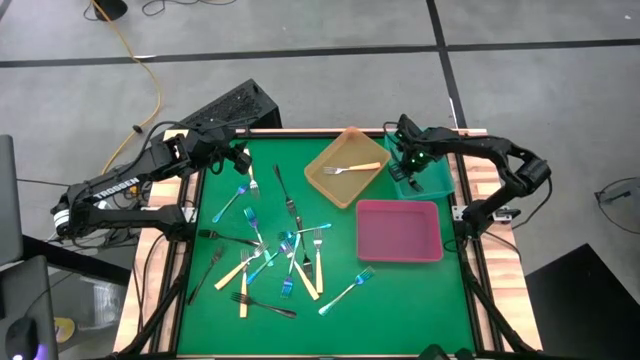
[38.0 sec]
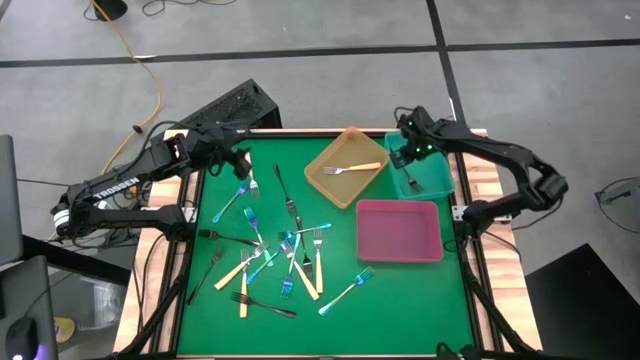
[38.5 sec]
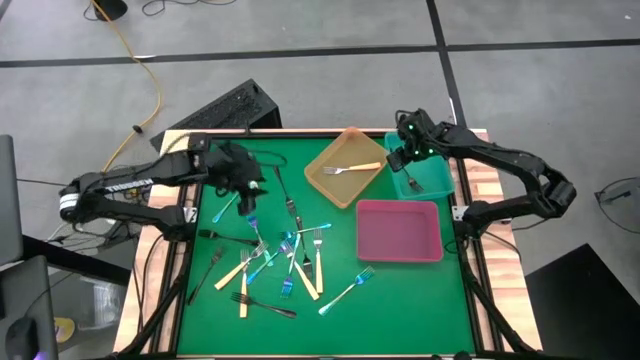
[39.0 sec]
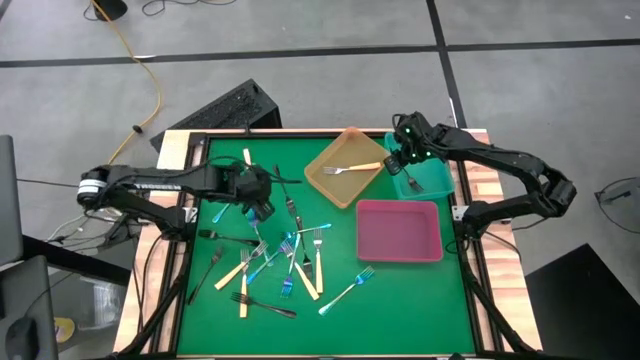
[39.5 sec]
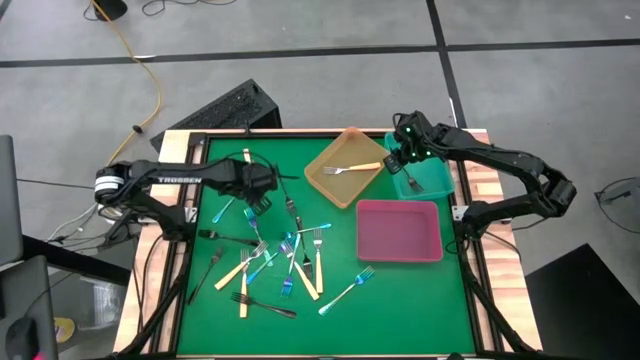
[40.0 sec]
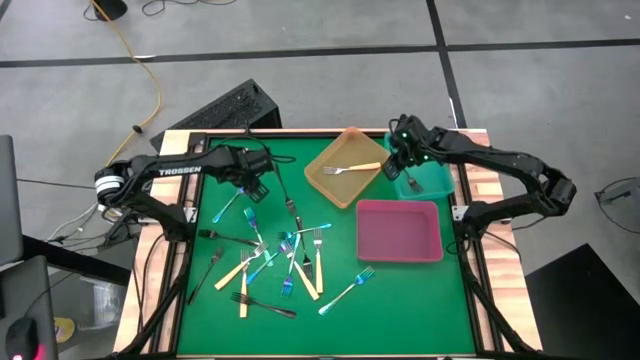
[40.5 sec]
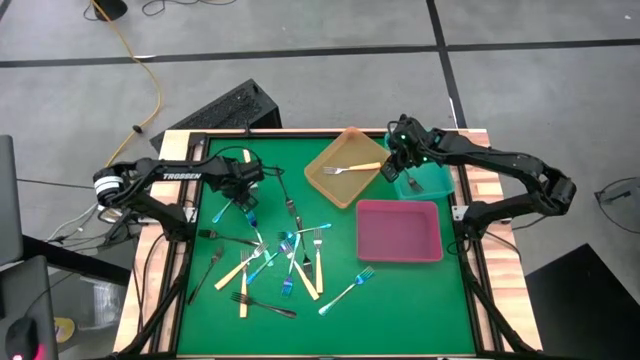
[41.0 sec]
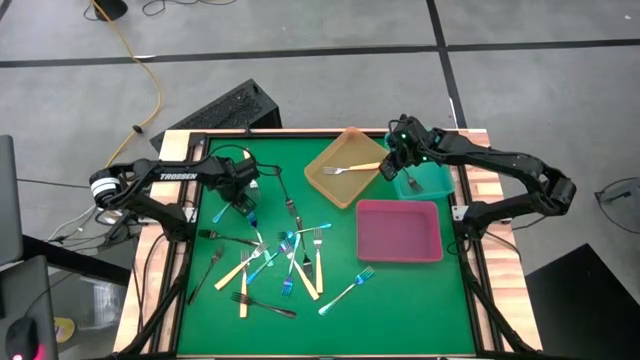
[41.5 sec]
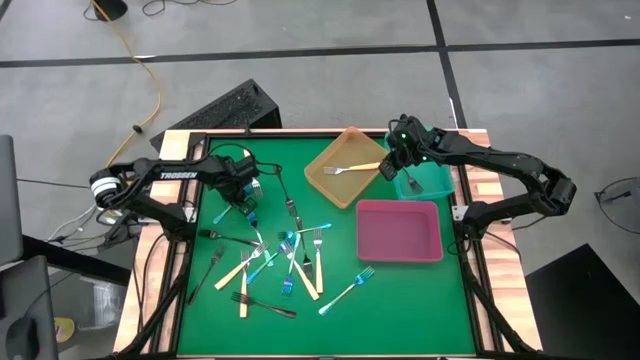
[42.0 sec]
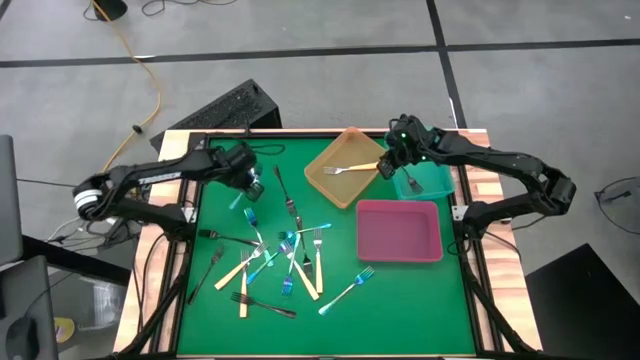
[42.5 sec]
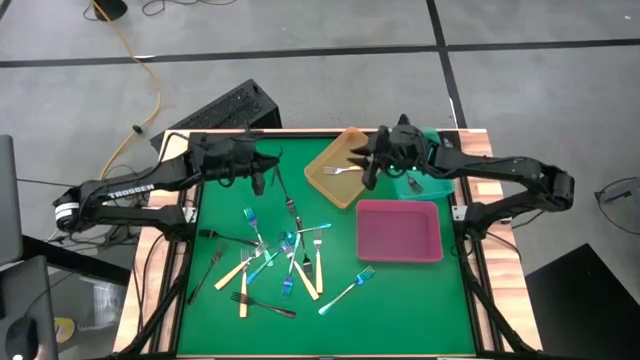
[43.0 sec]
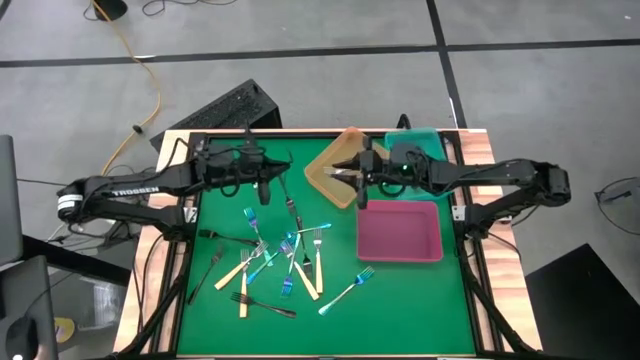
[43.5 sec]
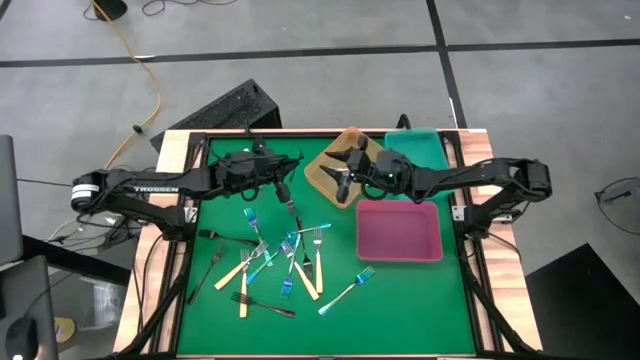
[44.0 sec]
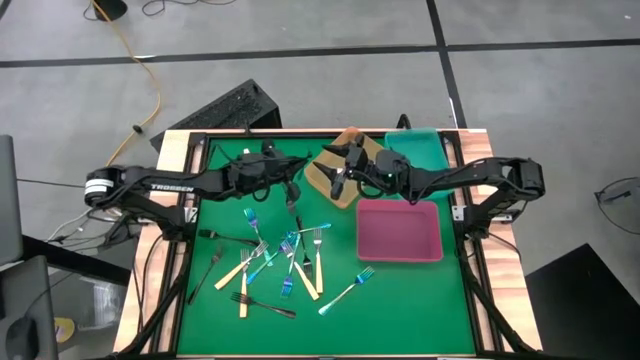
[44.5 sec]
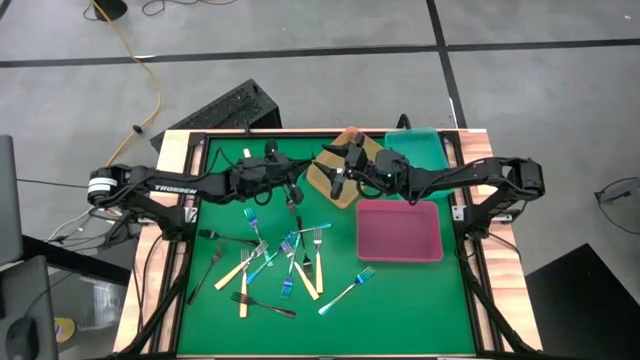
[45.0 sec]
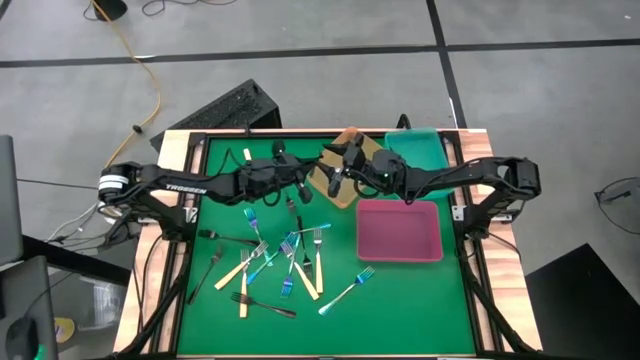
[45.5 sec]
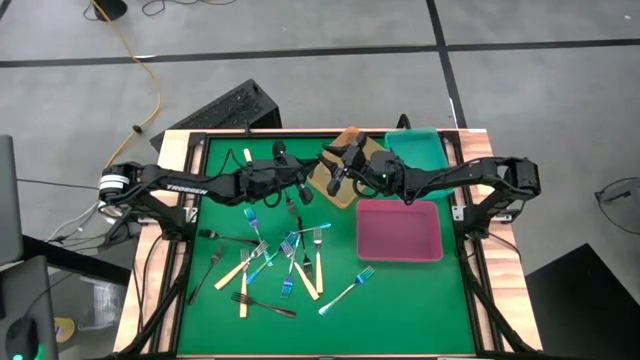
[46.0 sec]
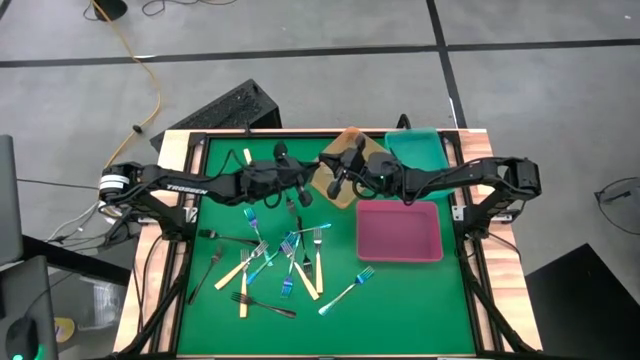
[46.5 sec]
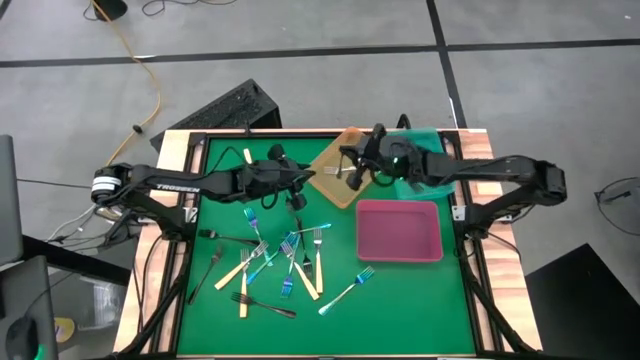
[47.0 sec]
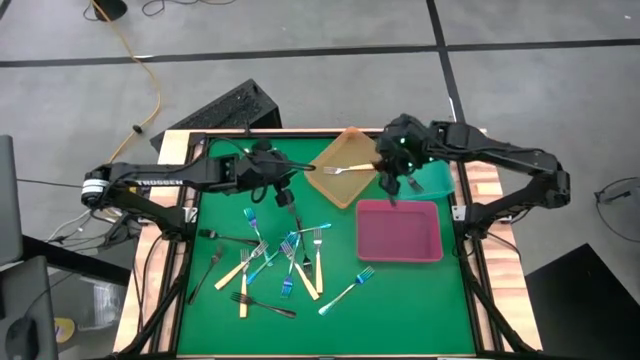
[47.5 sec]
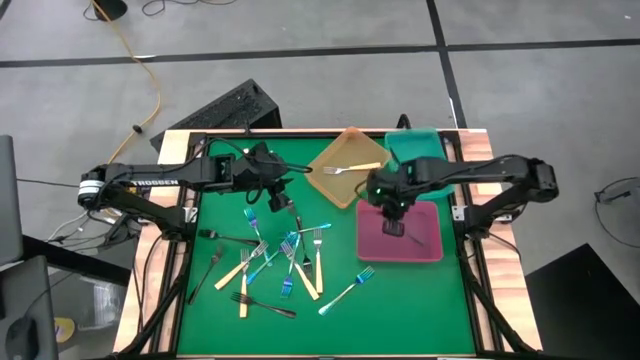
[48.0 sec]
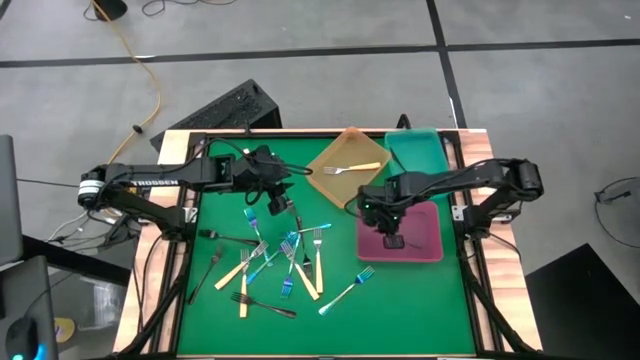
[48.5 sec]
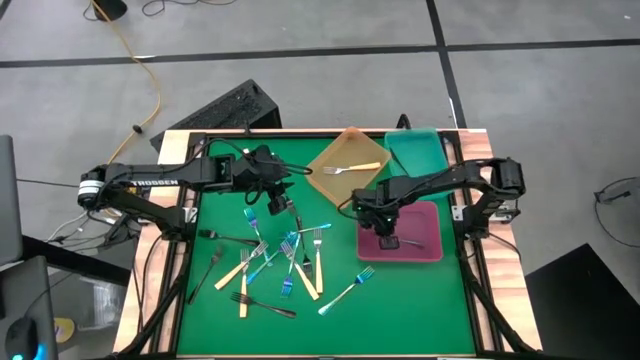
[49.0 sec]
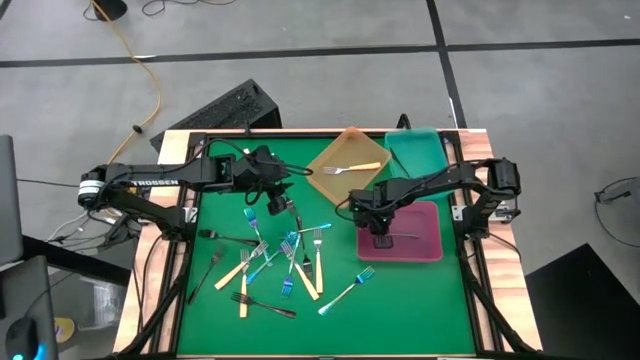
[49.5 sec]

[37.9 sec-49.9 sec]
Task: Sort silverware by color (type)
Put the blue fork into the pink bin

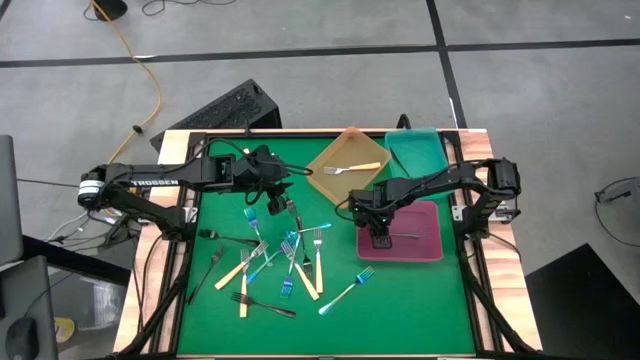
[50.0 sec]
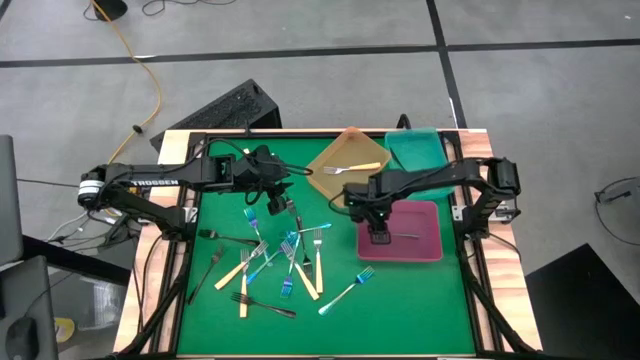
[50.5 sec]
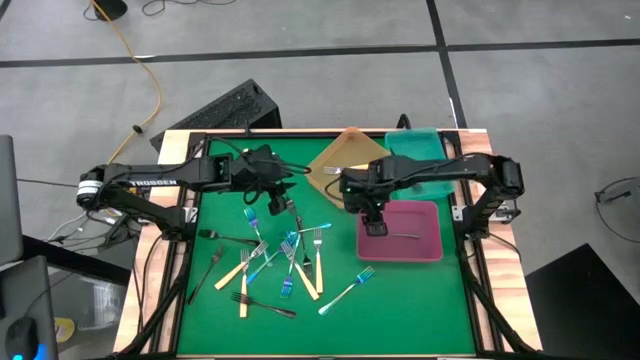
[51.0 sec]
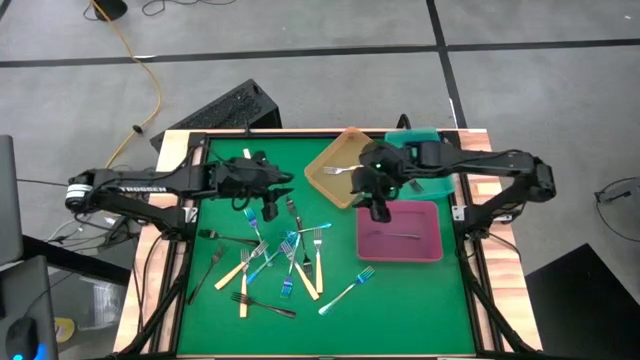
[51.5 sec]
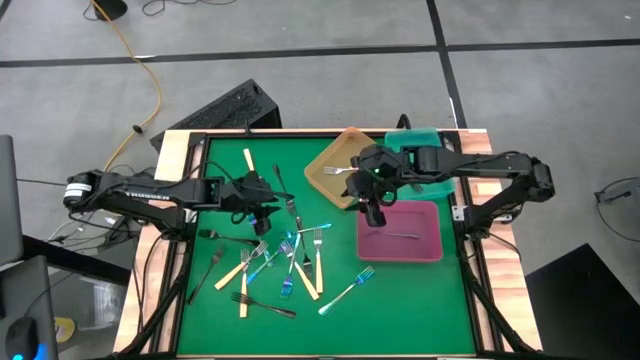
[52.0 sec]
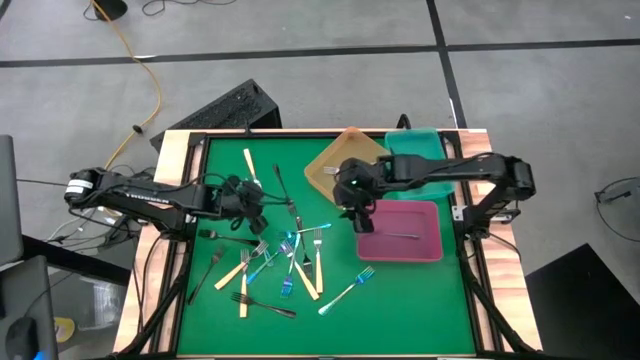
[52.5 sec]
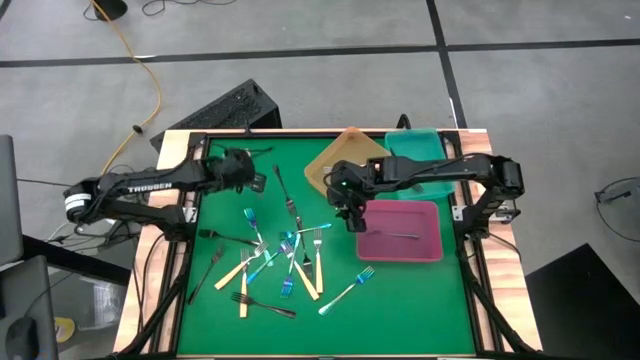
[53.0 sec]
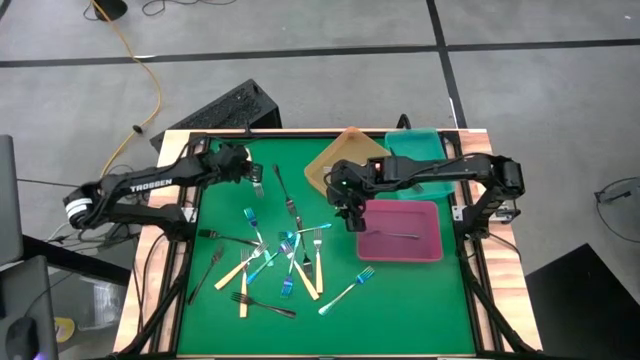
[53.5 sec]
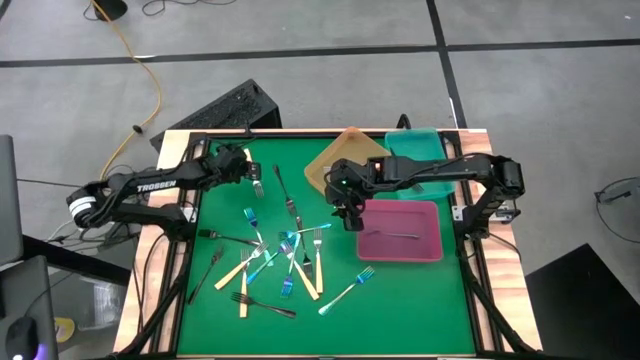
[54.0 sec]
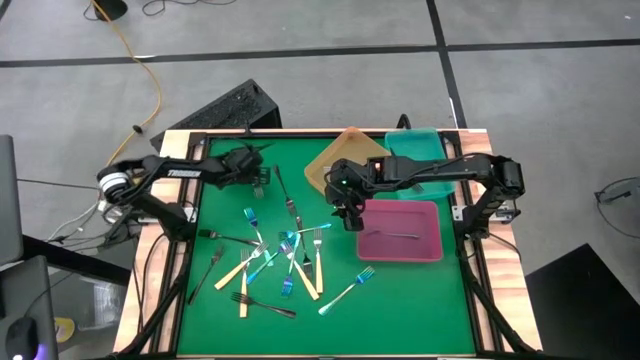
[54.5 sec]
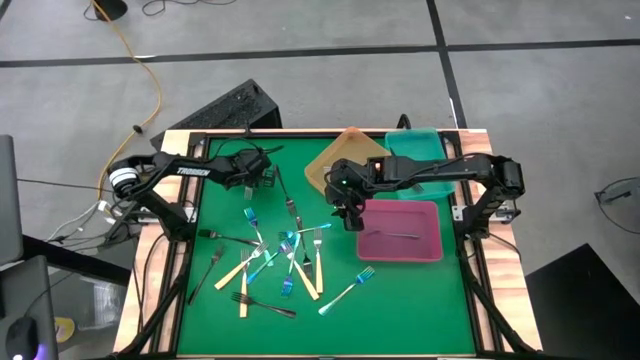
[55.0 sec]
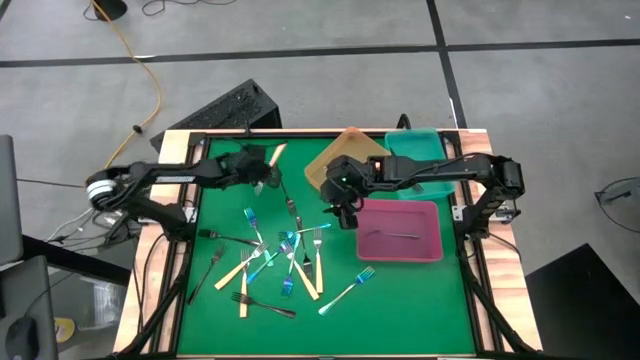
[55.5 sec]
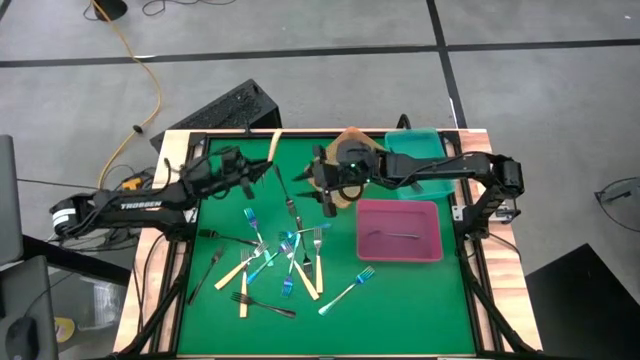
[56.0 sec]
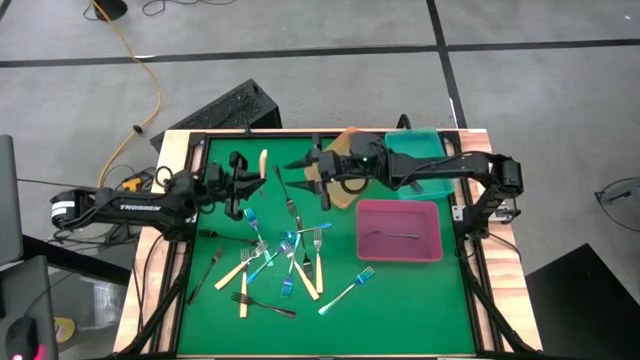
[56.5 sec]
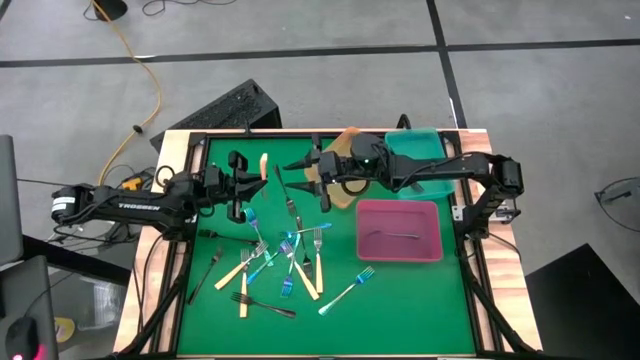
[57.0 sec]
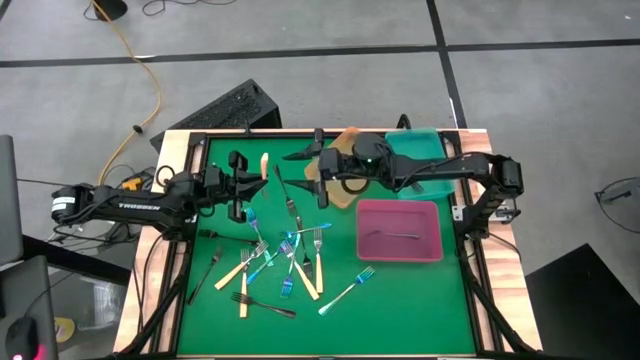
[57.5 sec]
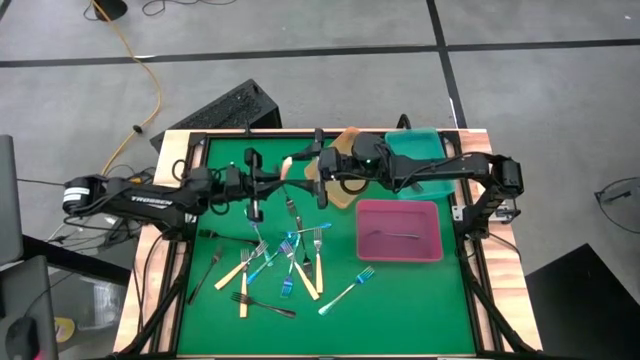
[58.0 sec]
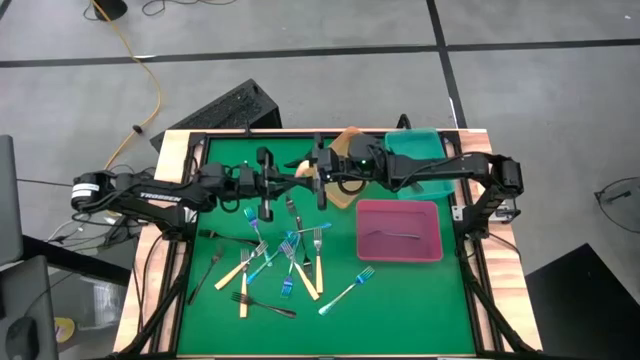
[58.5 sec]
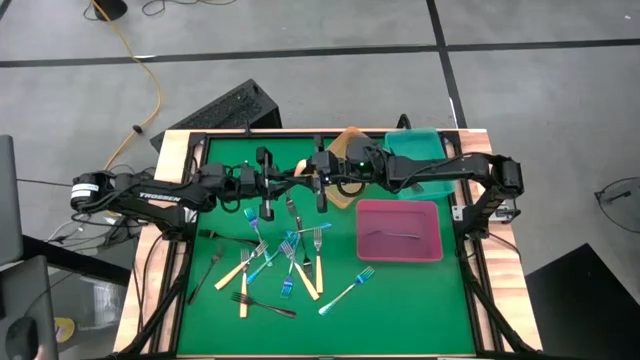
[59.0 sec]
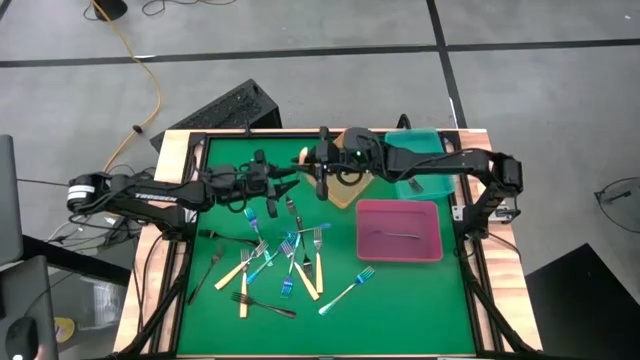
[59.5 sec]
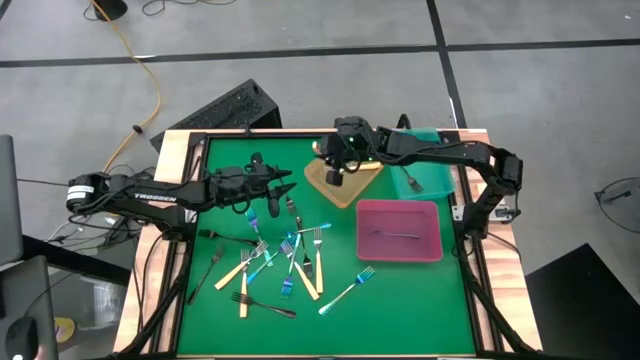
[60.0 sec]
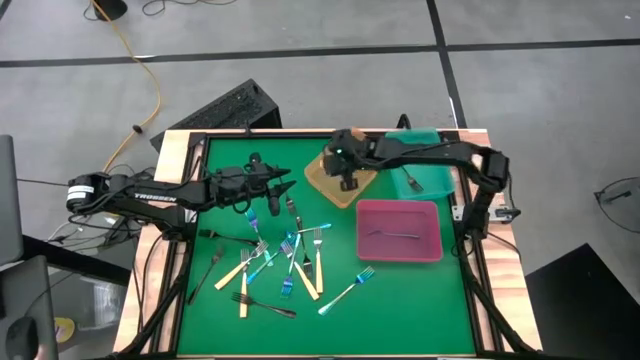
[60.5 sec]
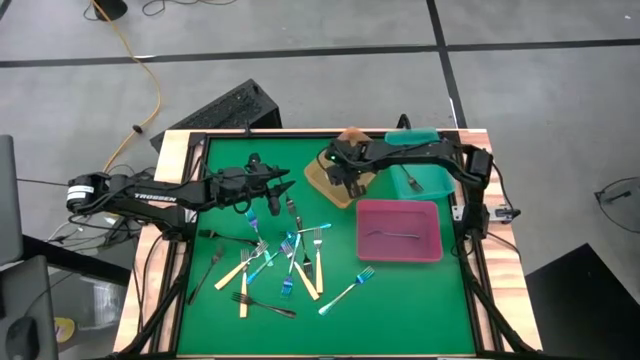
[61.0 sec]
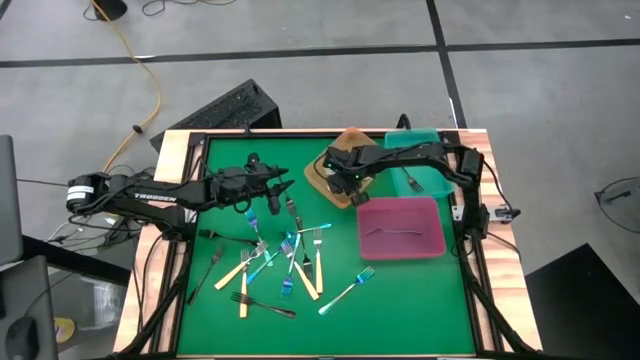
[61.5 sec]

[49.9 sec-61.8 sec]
Put the orange fork into the orange bin
